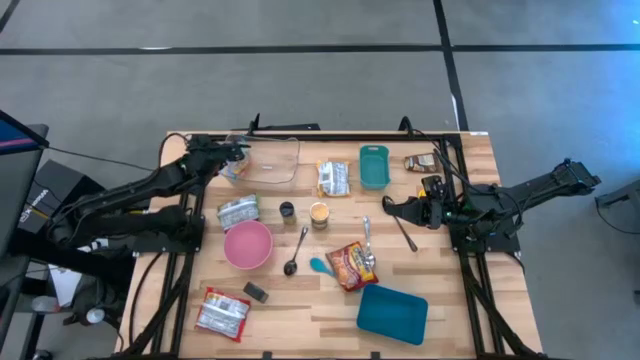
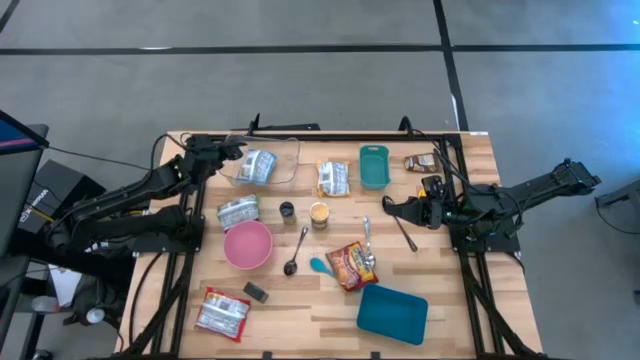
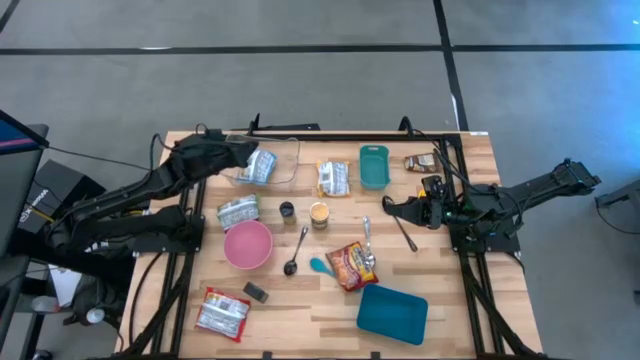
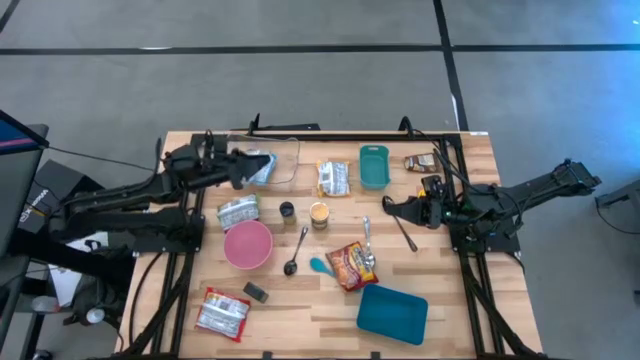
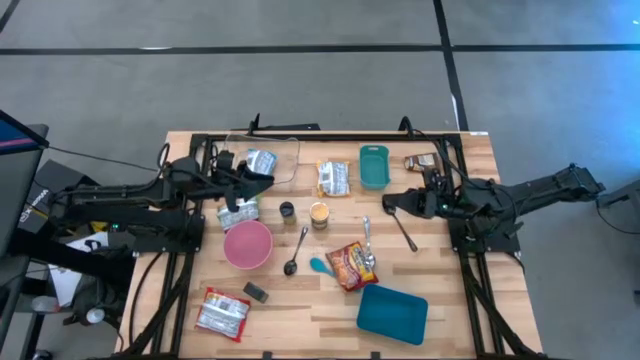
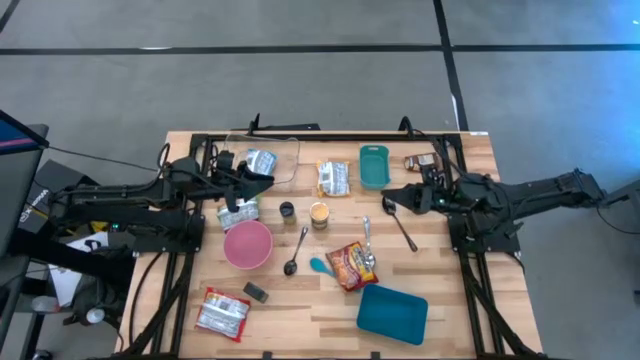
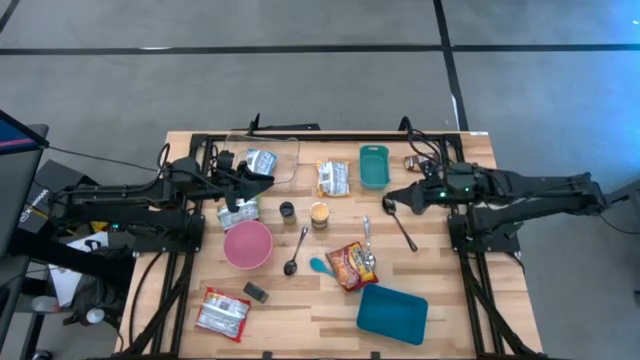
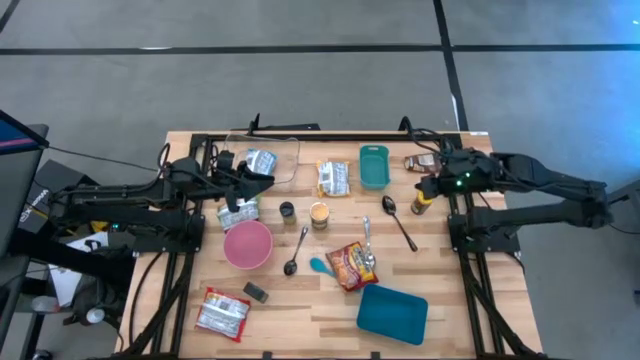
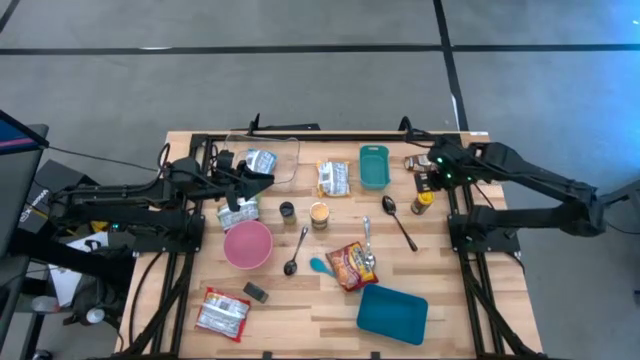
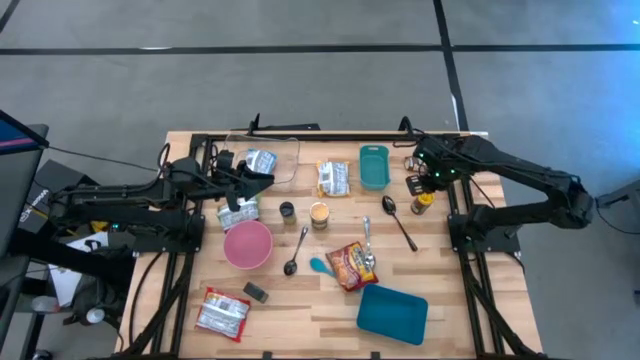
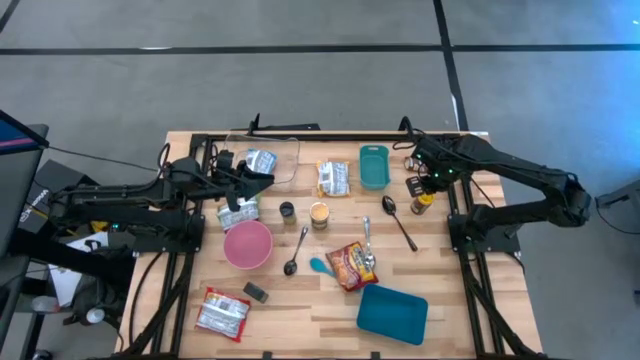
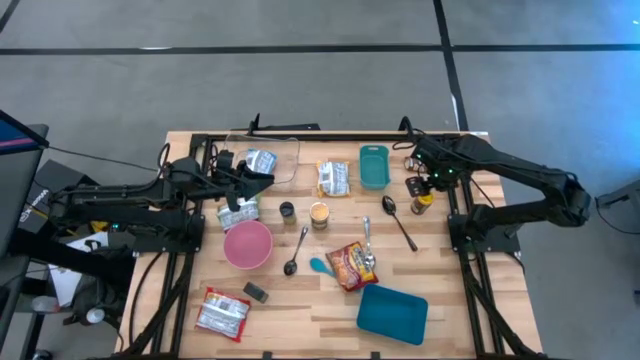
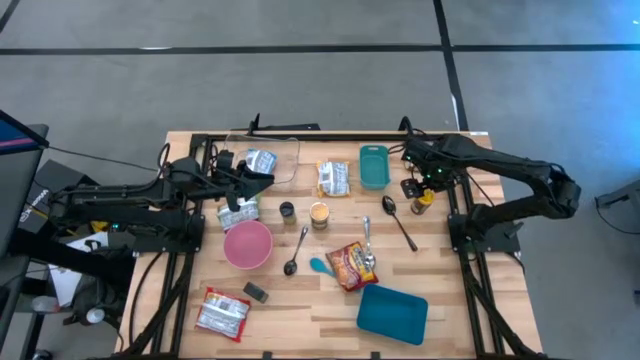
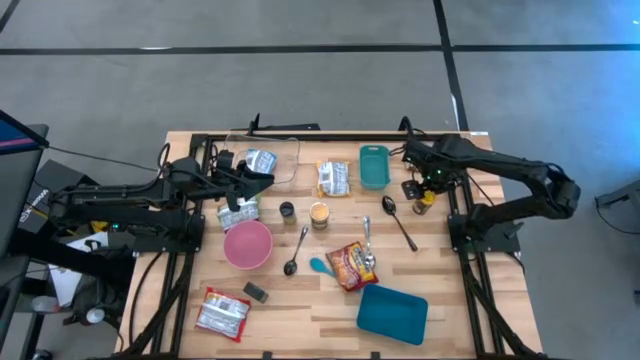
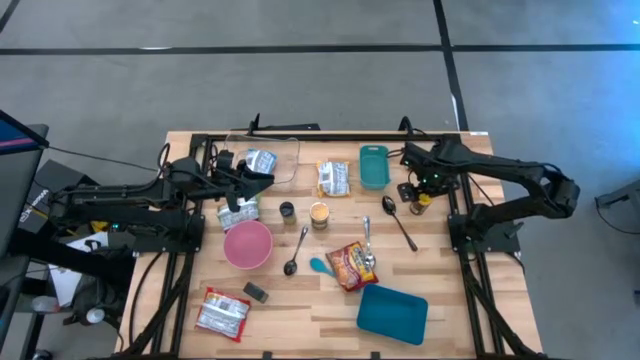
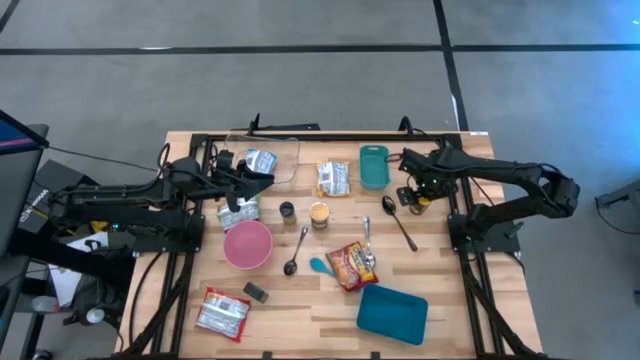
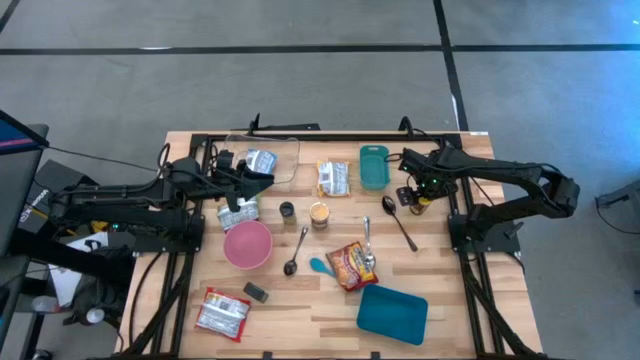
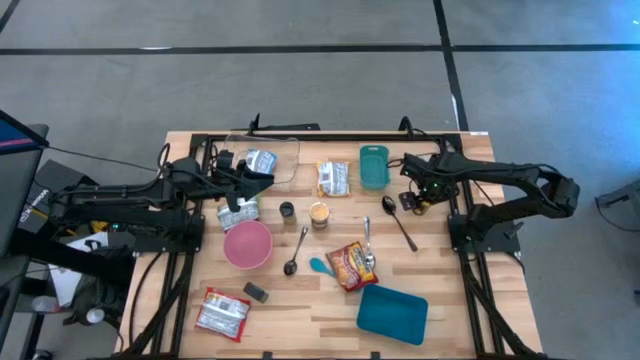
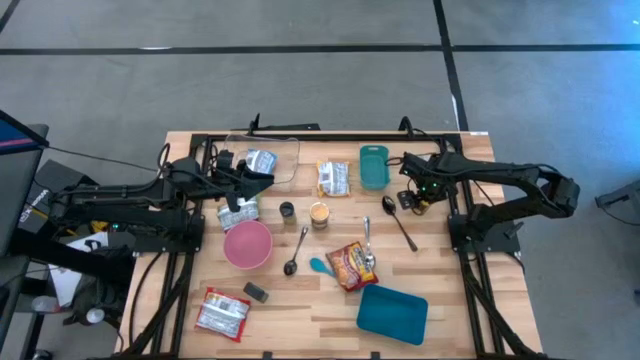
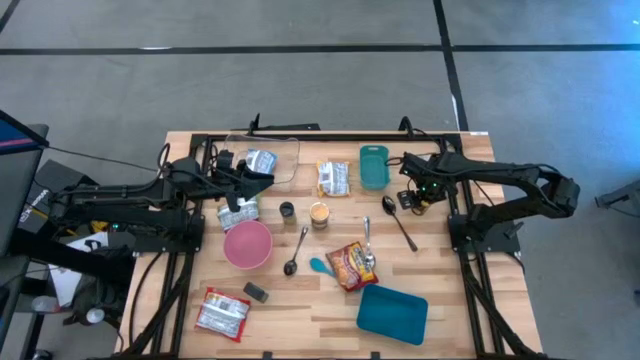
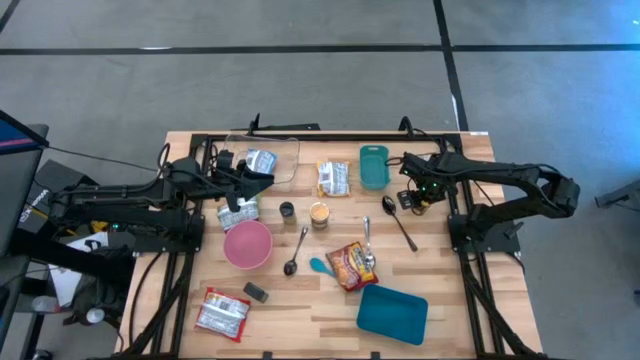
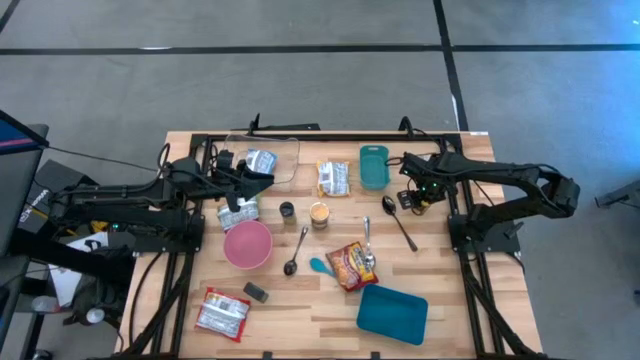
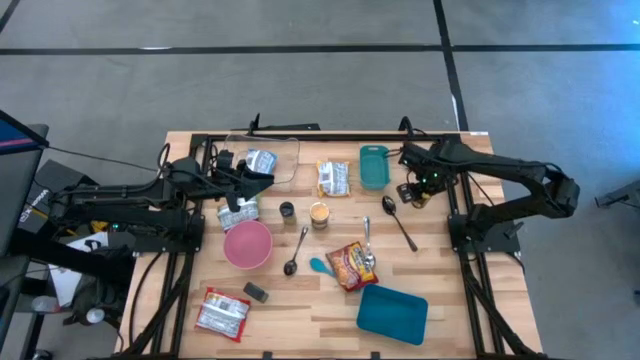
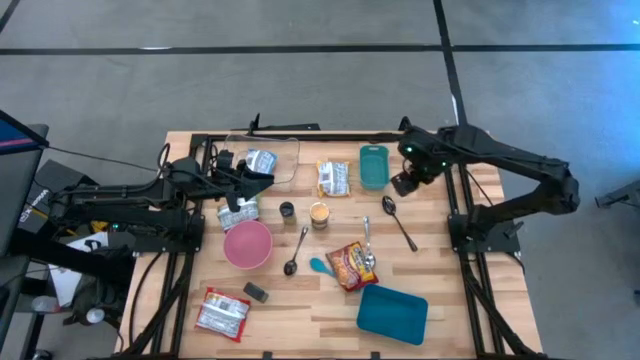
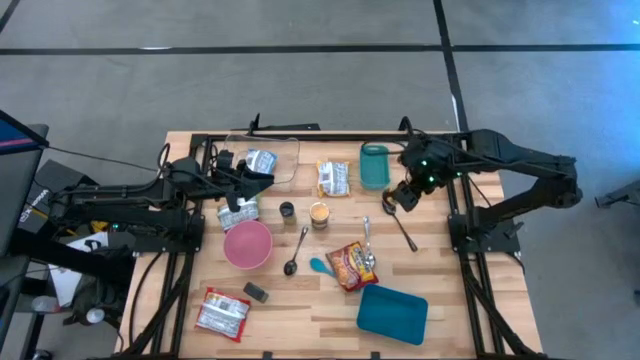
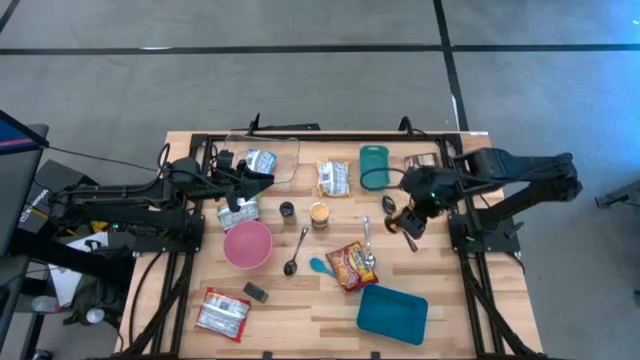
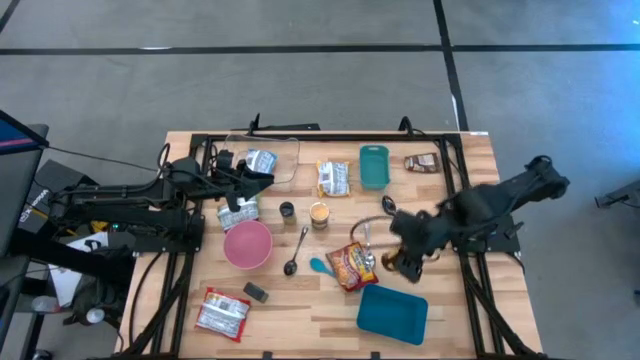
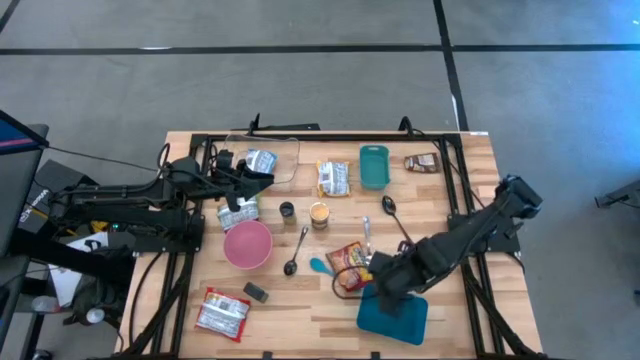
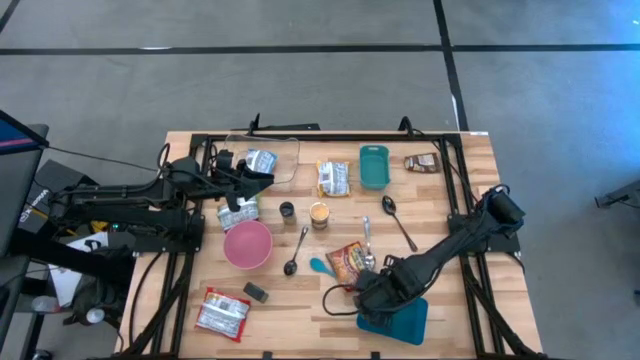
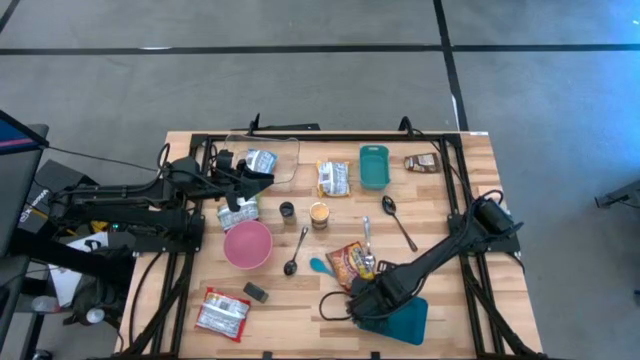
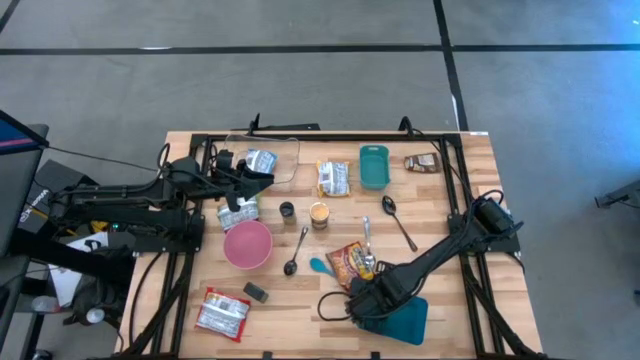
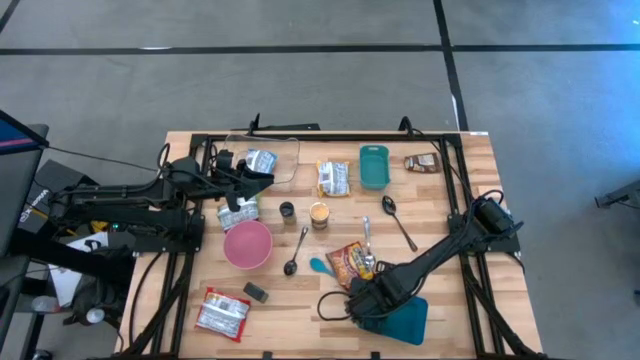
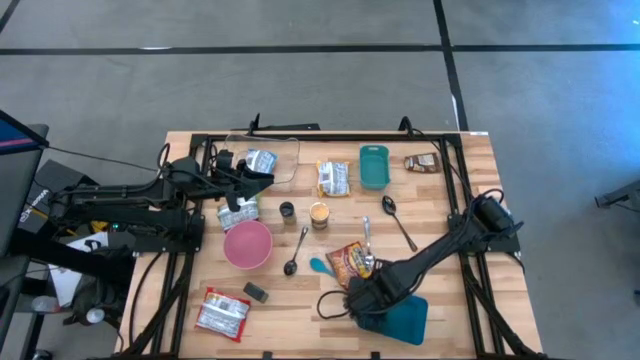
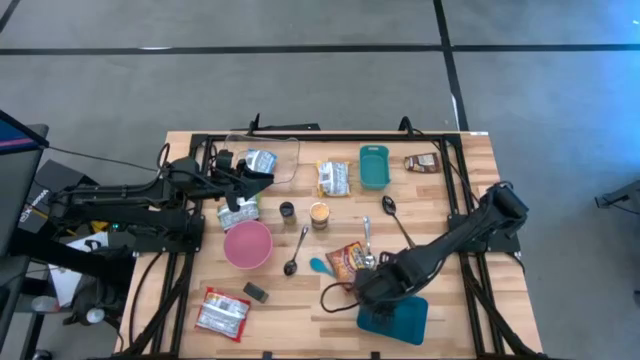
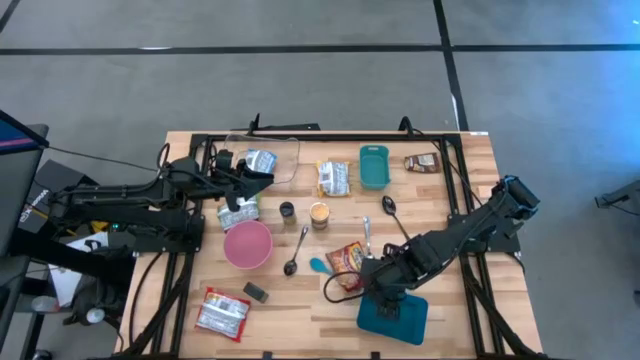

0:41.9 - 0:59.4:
Task: Pick & Place Food Item
Put the yellow seasoning bottle into the blue bin

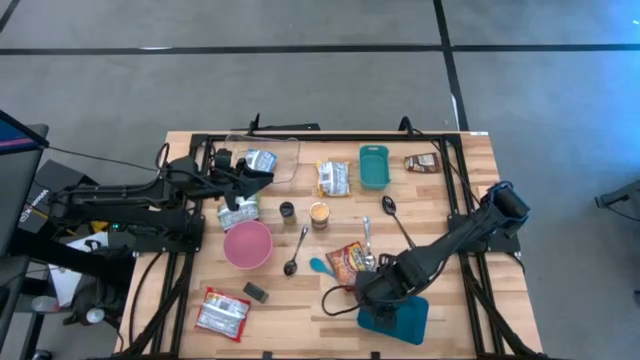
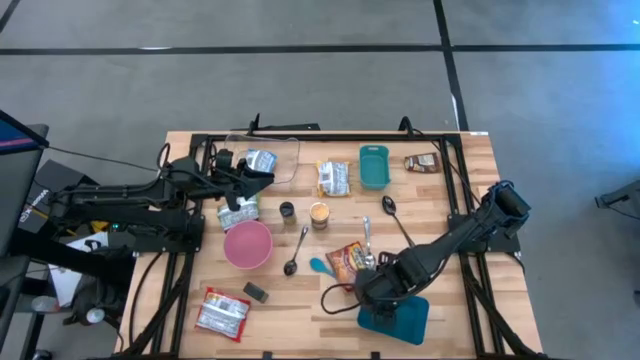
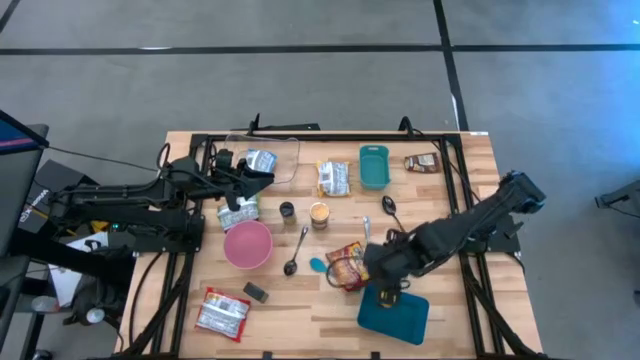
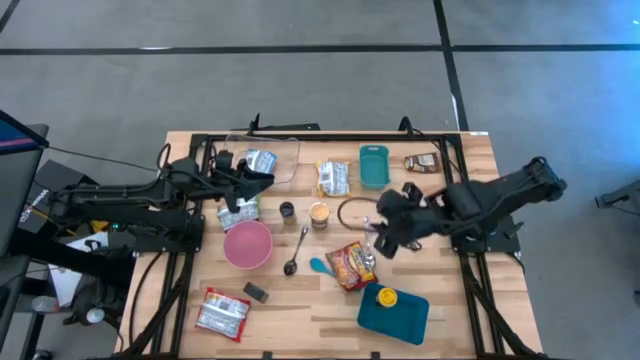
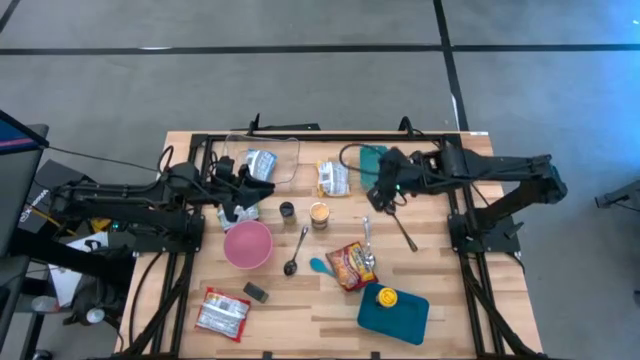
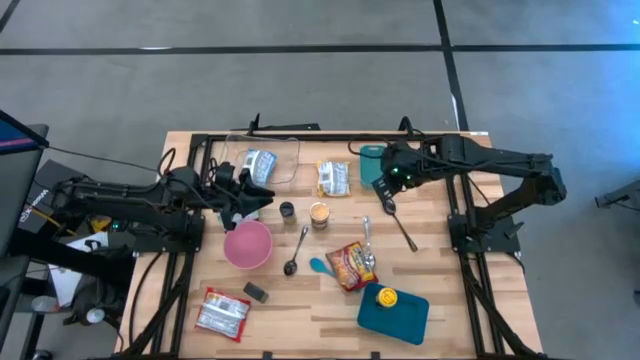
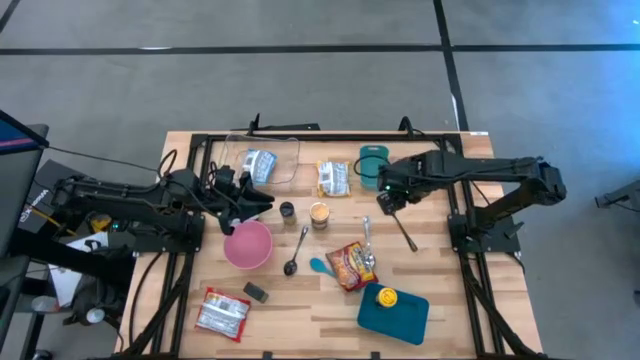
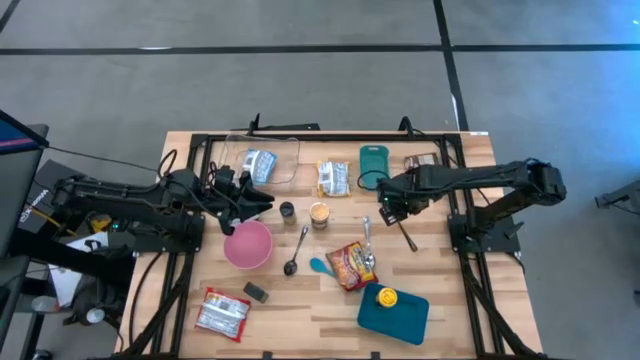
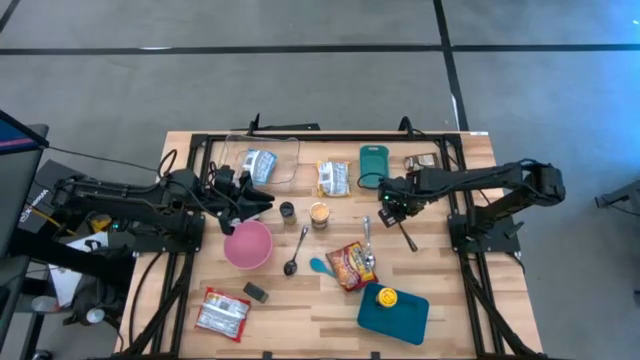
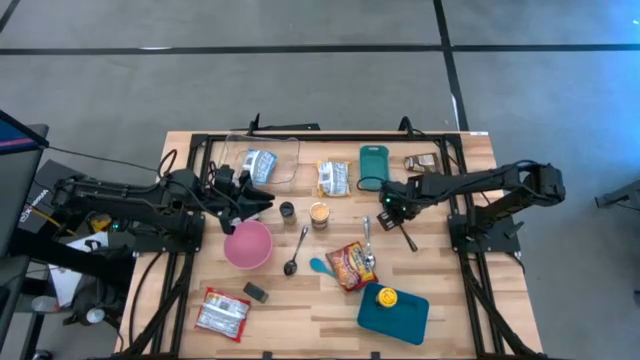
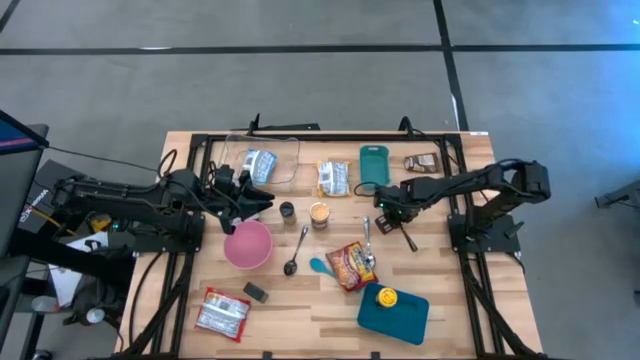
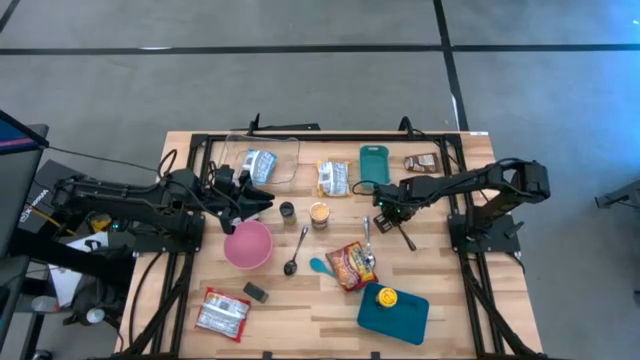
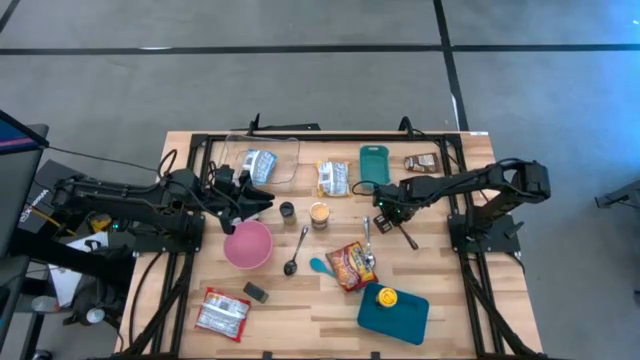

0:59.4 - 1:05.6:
Put the right black spoon into the green bin
